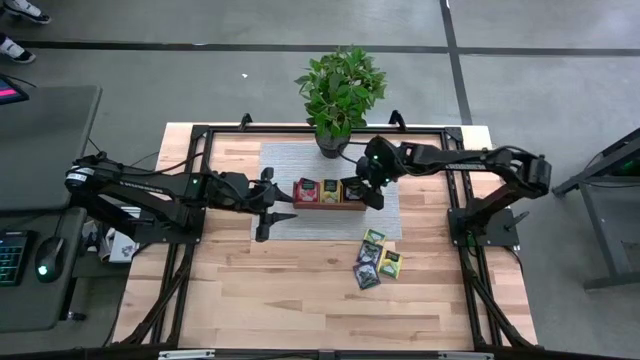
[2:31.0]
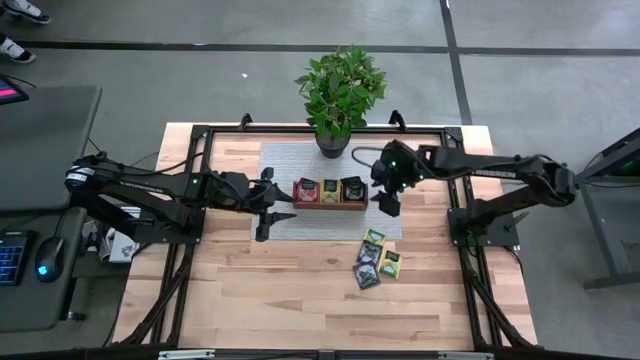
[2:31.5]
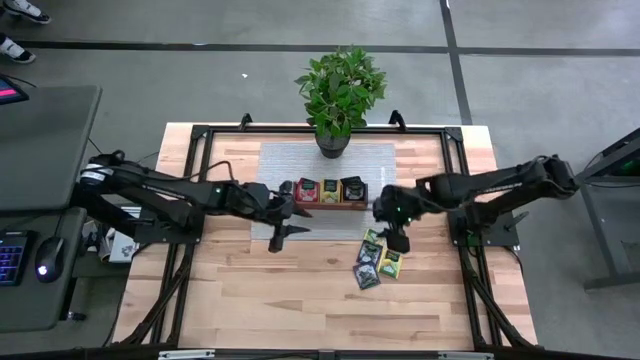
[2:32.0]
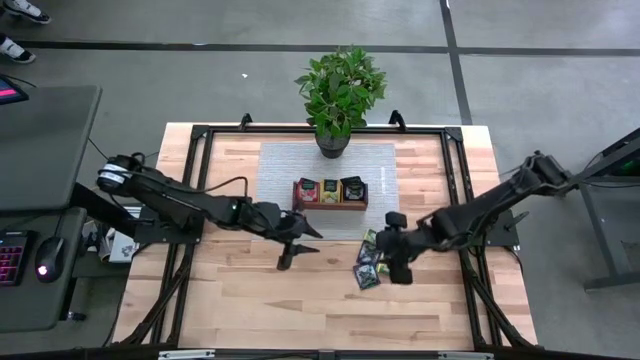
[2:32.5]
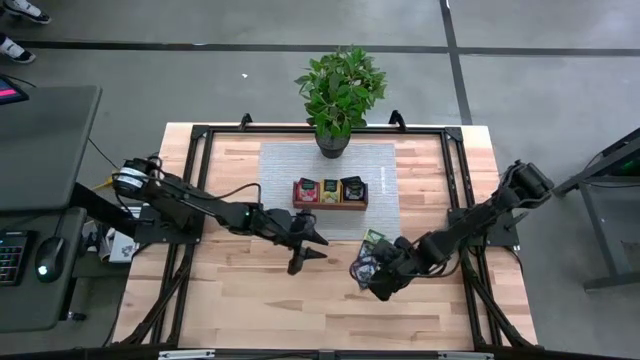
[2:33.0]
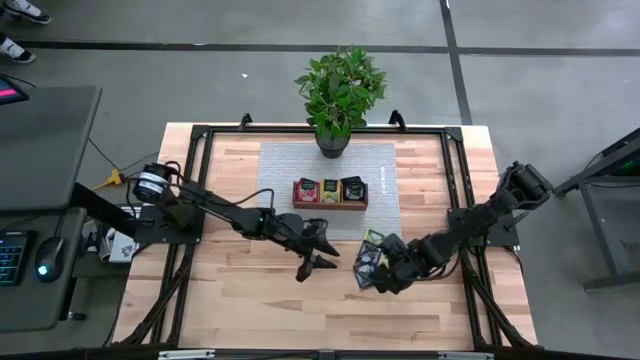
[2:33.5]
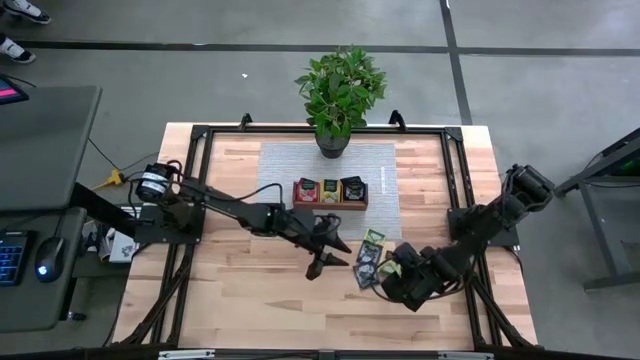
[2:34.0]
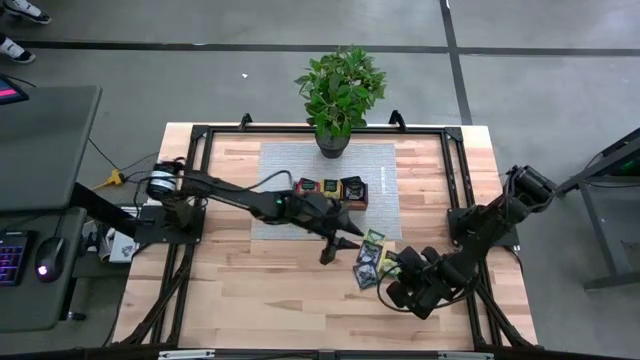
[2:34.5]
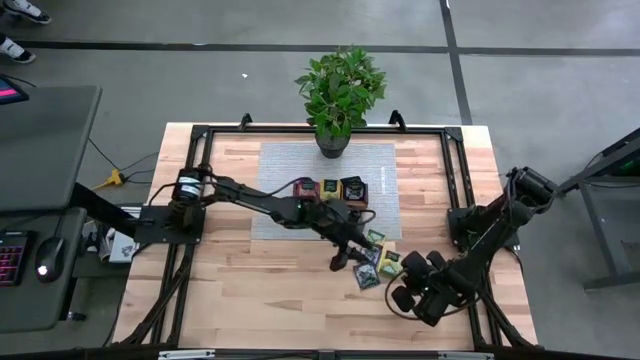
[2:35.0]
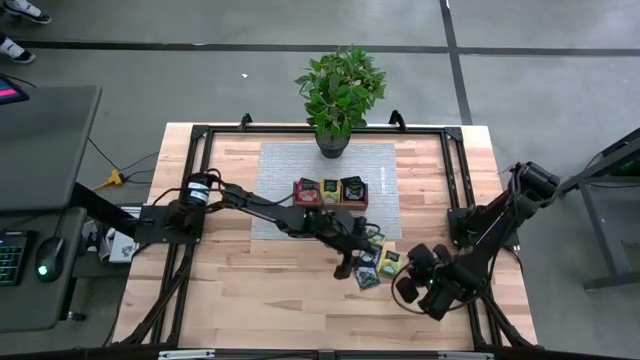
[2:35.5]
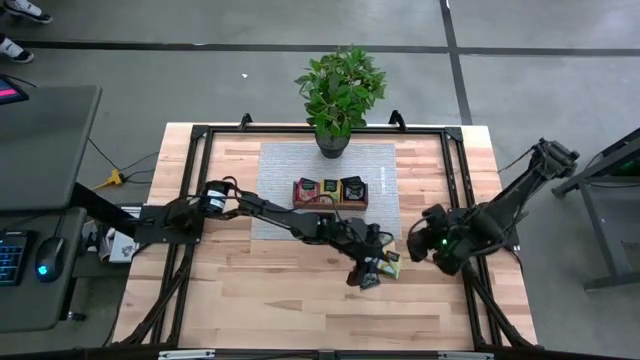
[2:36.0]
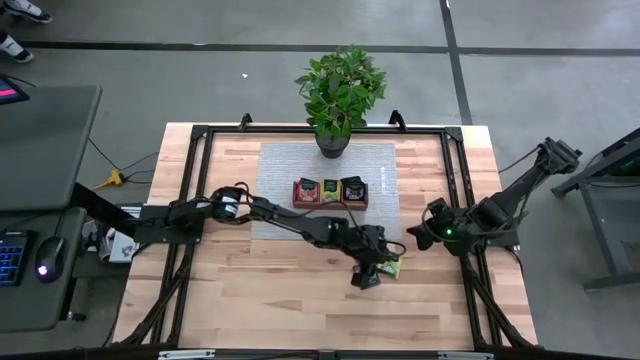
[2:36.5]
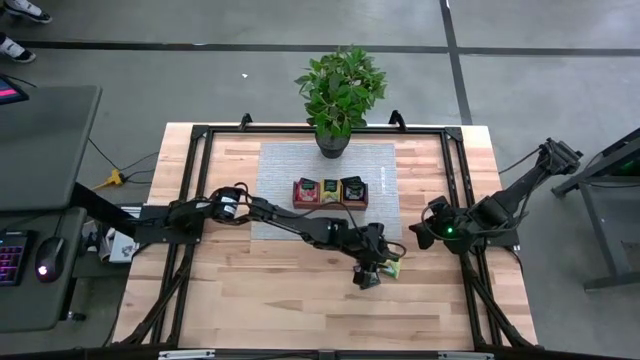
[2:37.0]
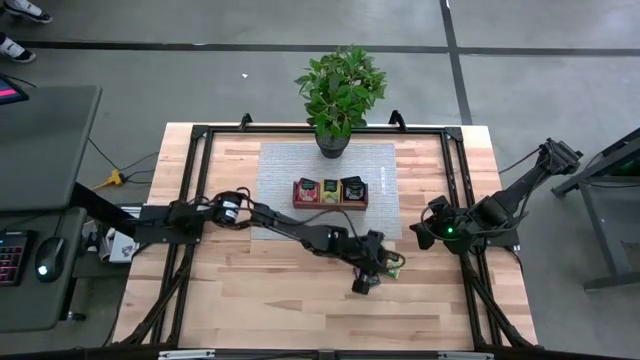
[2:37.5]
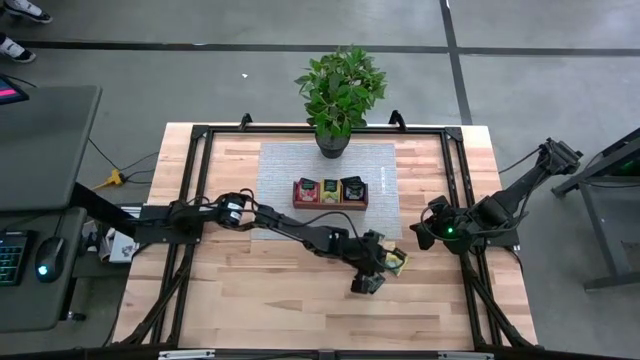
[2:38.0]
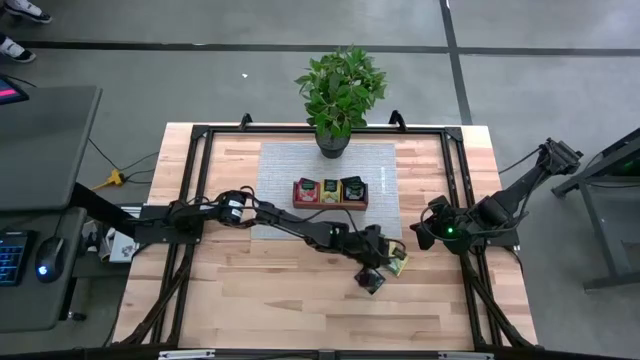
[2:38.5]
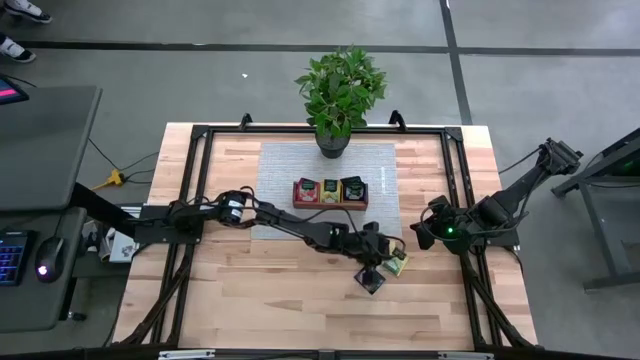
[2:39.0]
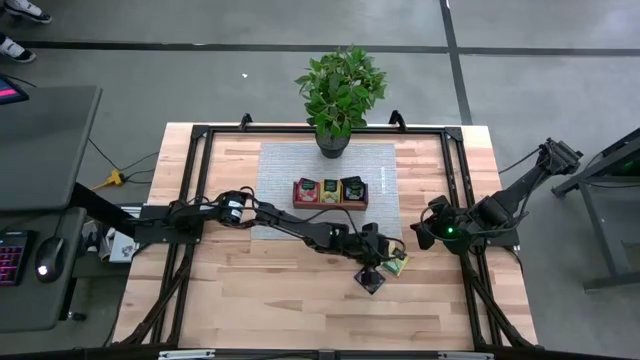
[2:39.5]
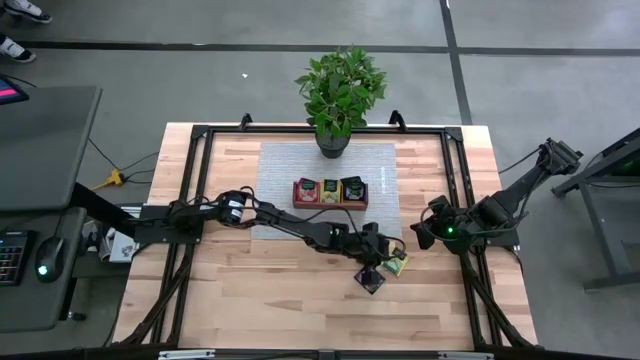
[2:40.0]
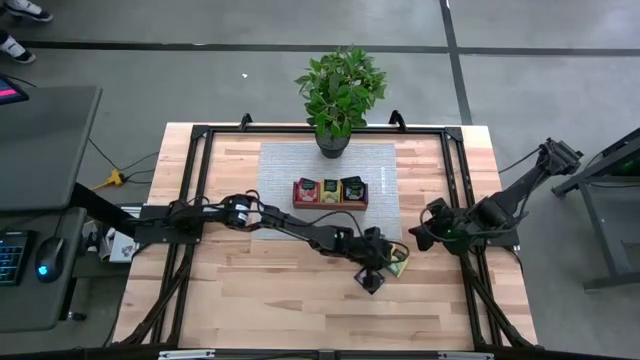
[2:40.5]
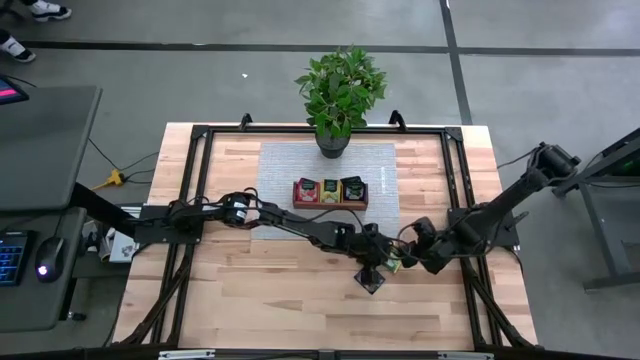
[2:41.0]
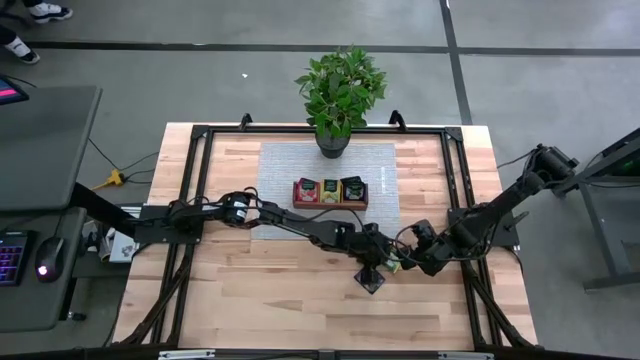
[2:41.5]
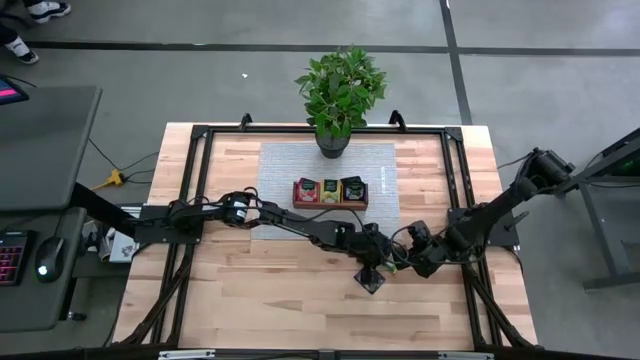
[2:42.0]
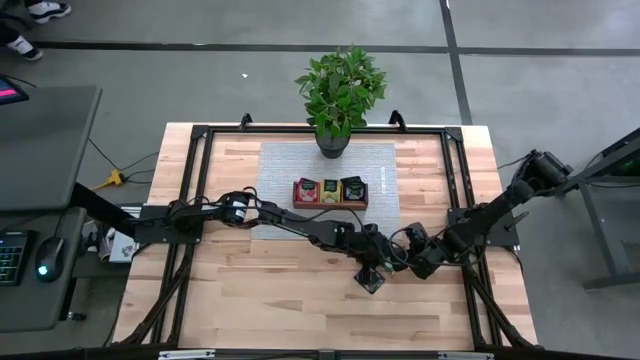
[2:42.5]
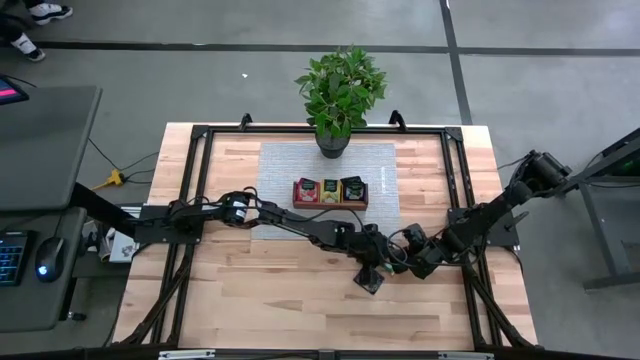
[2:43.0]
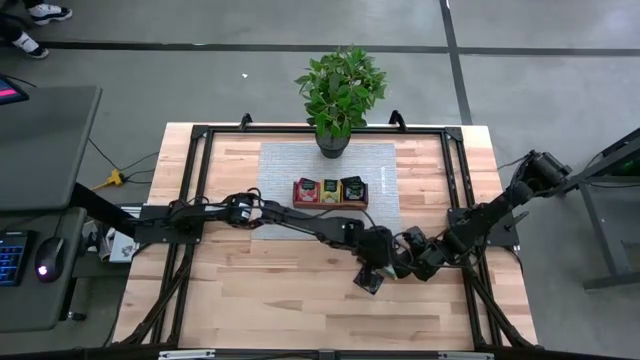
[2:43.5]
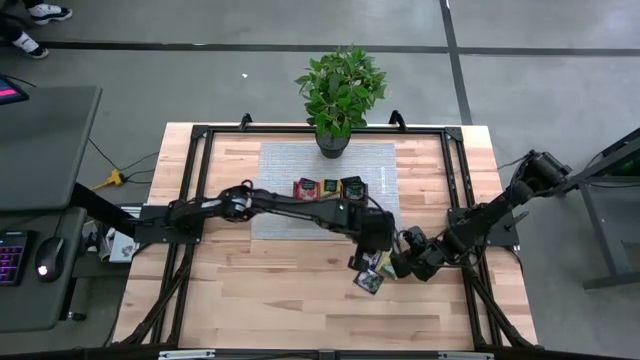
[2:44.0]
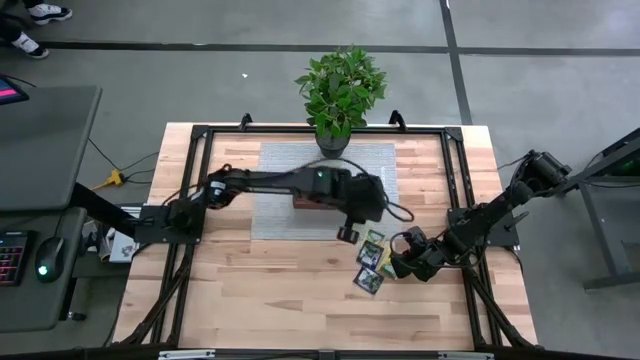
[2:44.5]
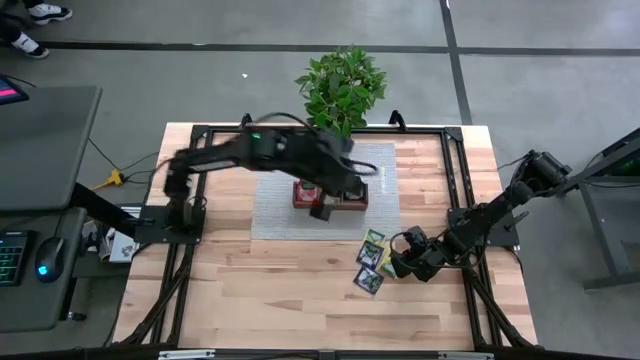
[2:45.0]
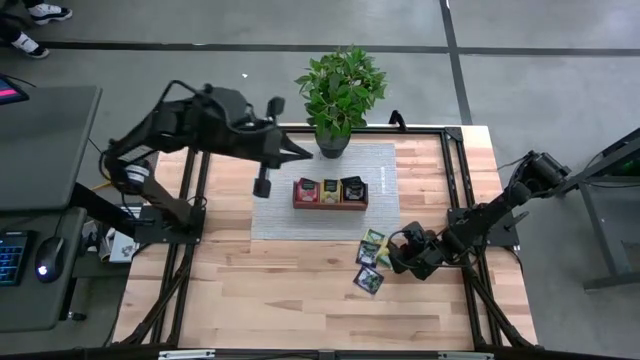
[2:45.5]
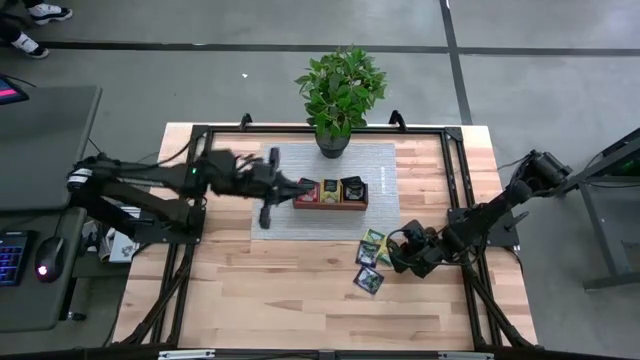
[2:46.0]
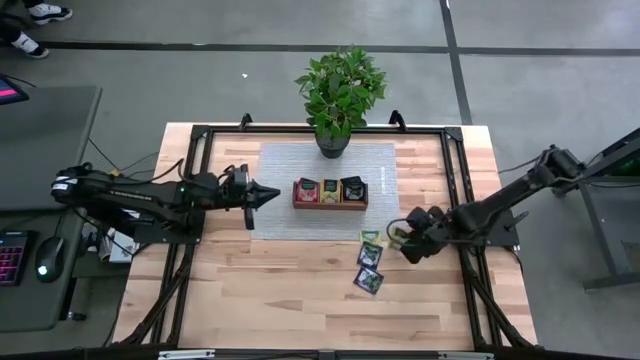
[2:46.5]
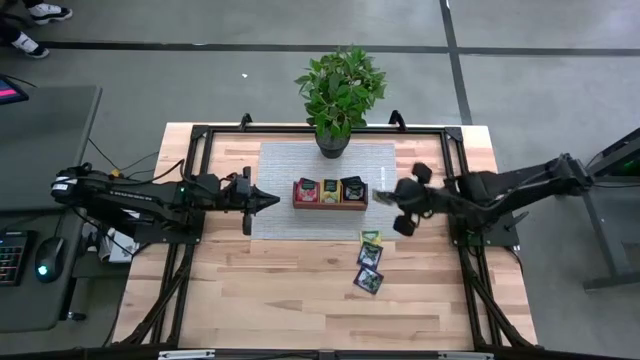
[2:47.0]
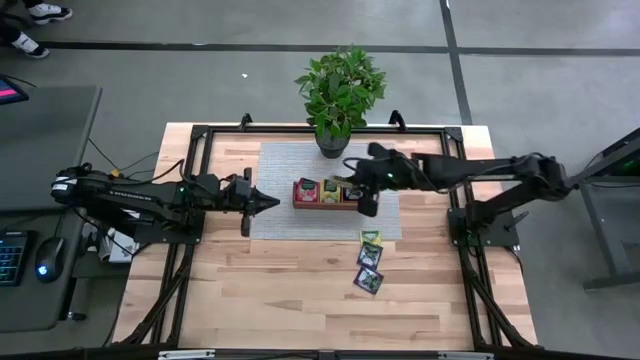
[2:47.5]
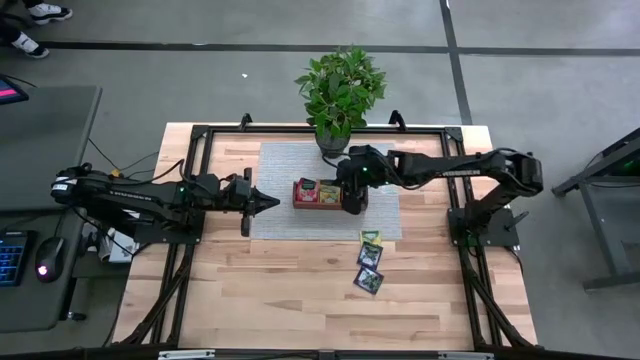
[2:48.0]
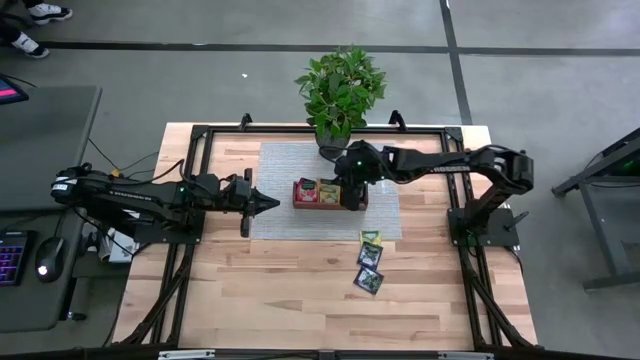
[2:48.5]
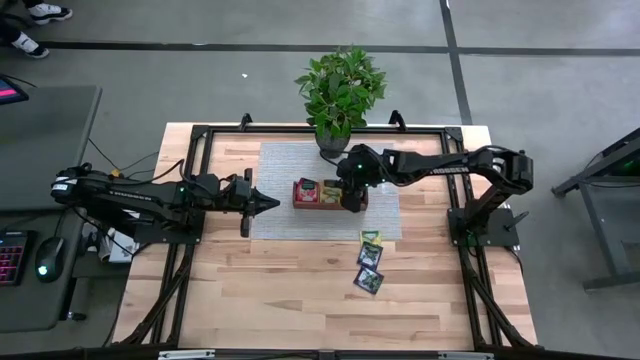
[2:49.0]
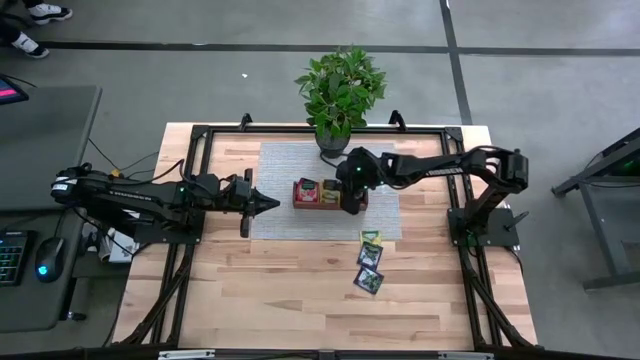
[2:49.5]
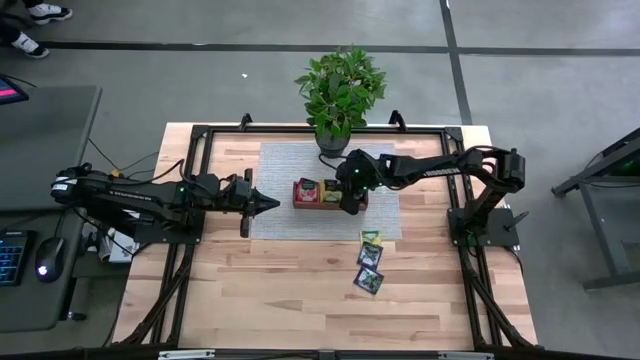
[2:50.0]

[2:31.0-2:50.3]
Task: Pick & Place Tea
Put the yellow tea bag into the middle section of the wooden organizer

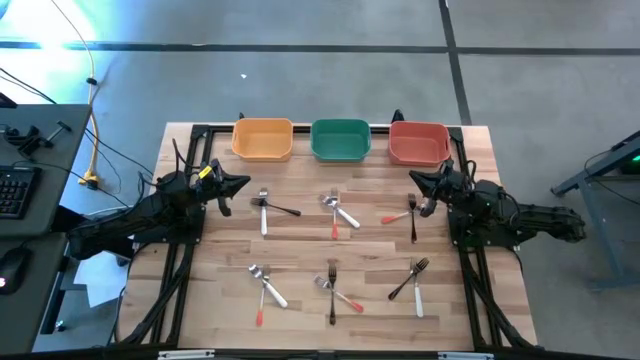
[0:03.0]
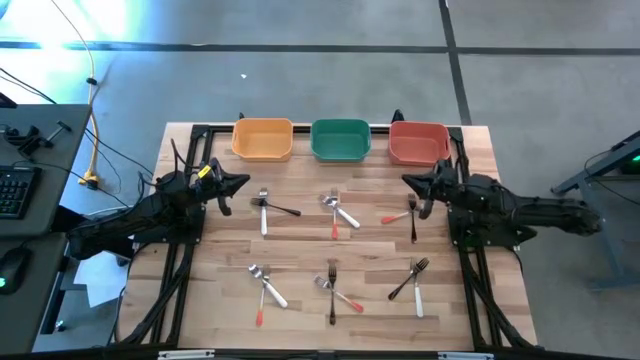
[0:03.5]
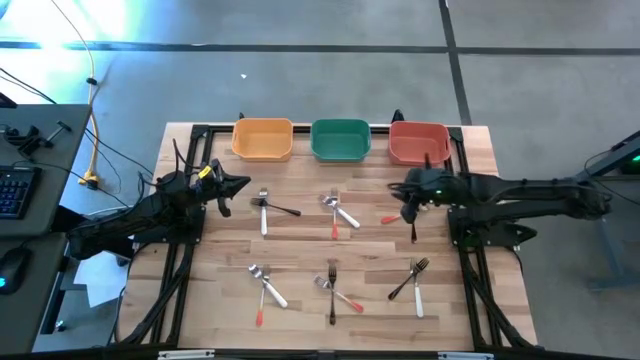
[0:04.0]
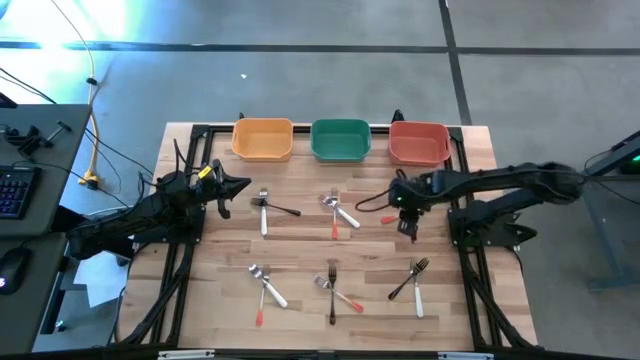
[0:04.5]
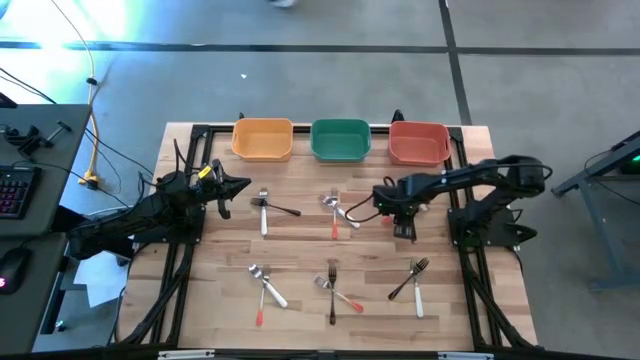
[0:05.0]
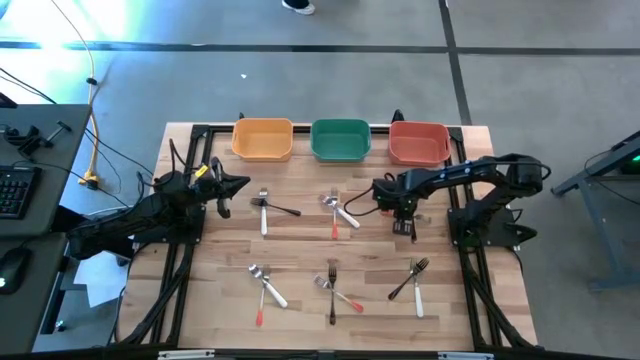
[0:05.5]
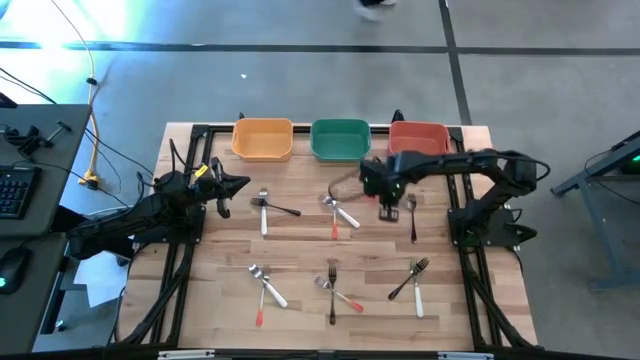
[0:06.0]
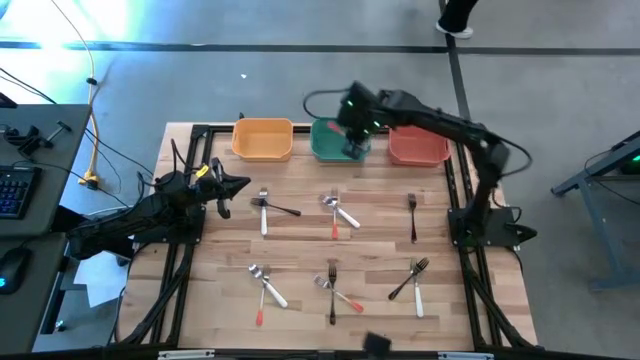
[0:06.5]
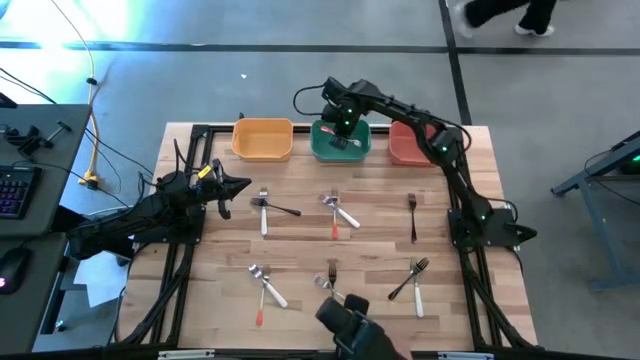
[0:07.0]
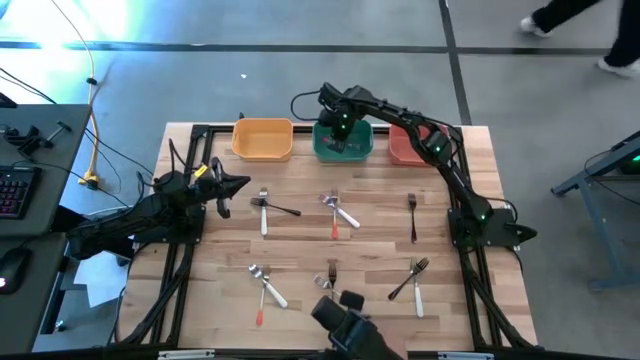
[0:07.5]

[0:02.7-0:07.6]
Task: Sort silverware by color (type)
Put the top right orange fork into the blue bin
